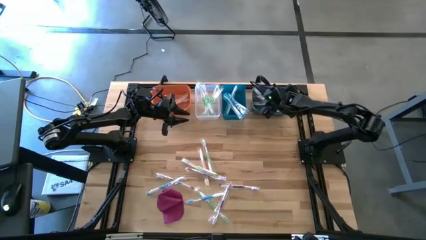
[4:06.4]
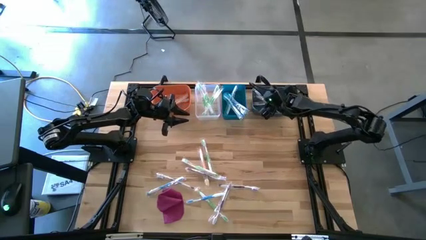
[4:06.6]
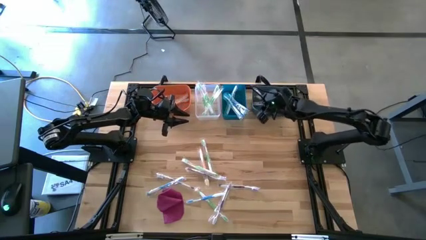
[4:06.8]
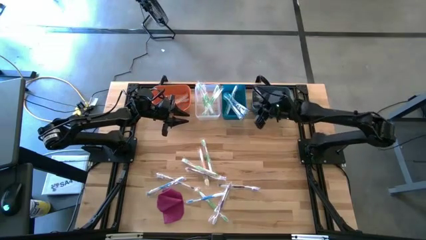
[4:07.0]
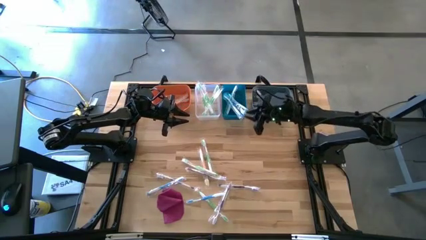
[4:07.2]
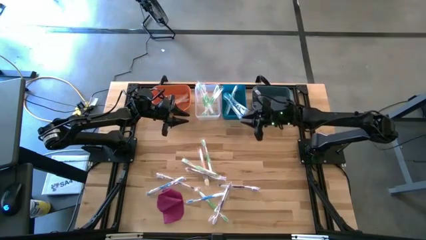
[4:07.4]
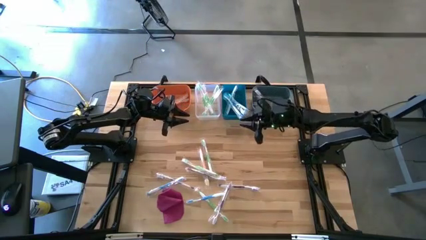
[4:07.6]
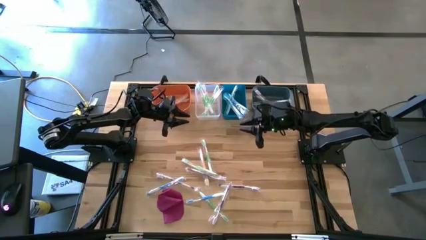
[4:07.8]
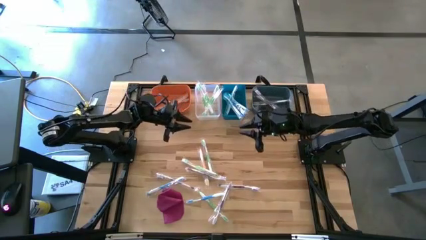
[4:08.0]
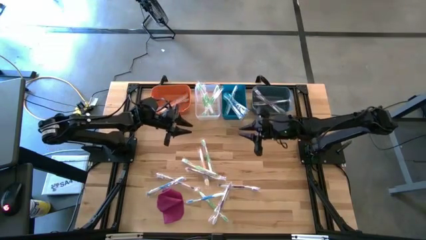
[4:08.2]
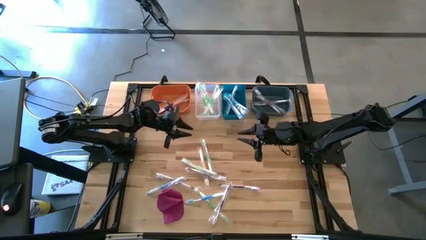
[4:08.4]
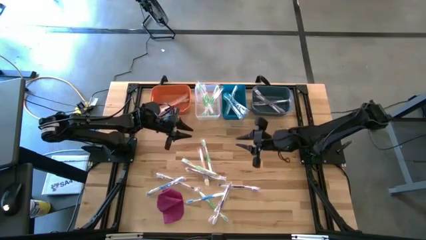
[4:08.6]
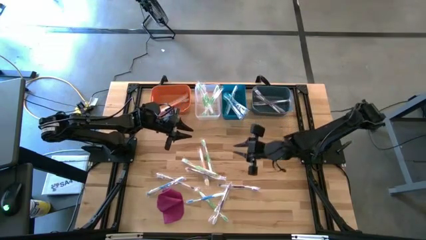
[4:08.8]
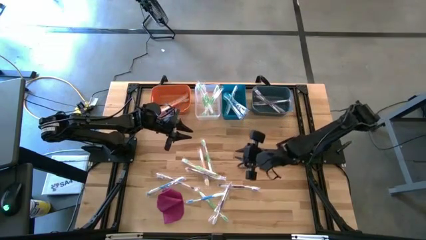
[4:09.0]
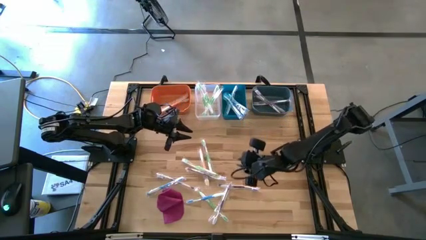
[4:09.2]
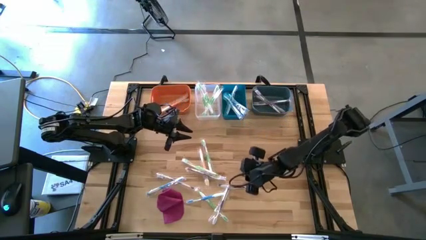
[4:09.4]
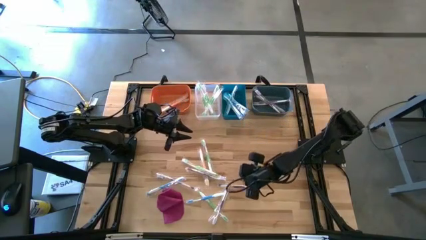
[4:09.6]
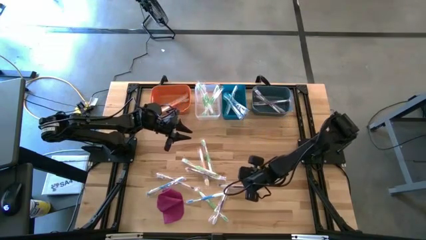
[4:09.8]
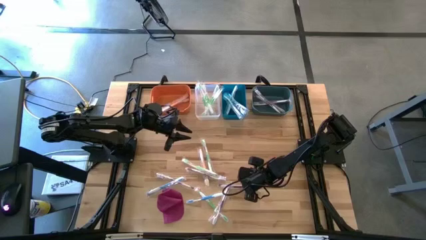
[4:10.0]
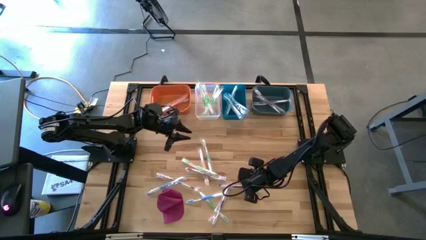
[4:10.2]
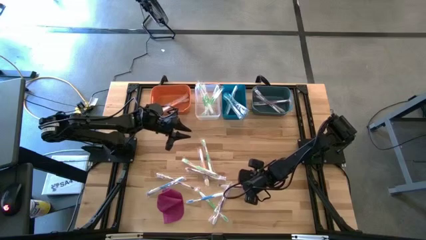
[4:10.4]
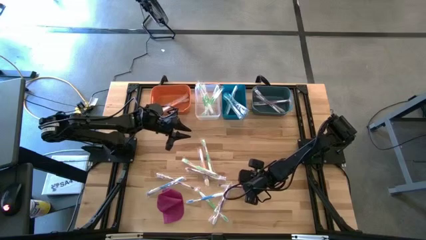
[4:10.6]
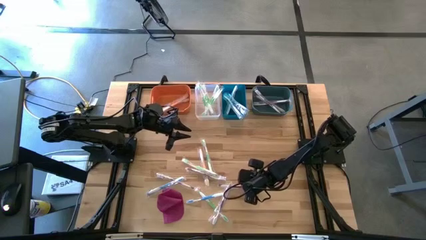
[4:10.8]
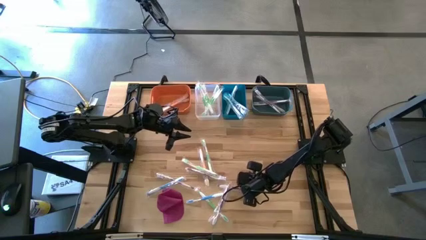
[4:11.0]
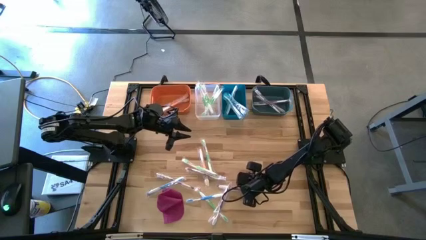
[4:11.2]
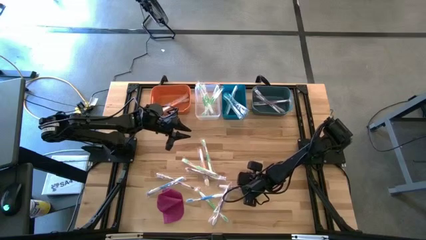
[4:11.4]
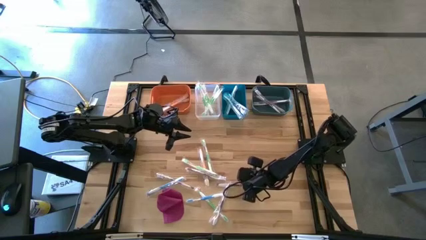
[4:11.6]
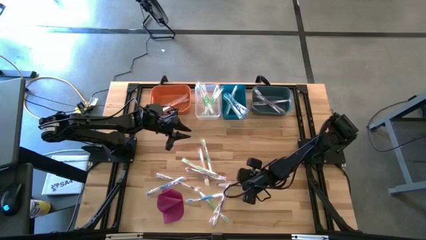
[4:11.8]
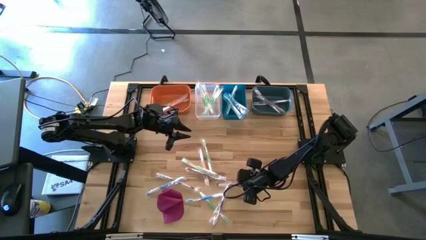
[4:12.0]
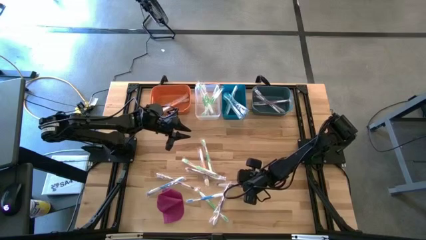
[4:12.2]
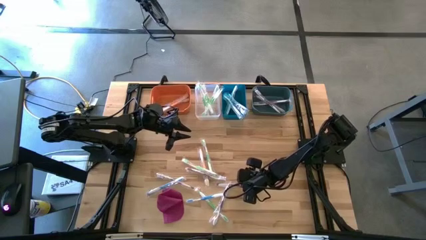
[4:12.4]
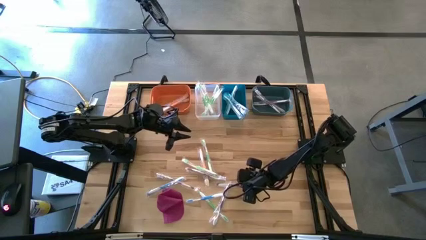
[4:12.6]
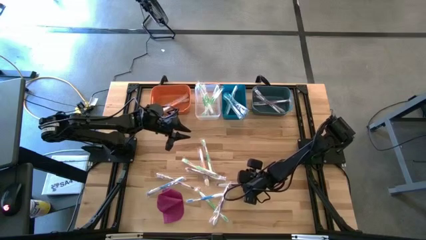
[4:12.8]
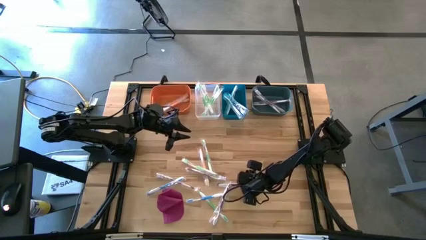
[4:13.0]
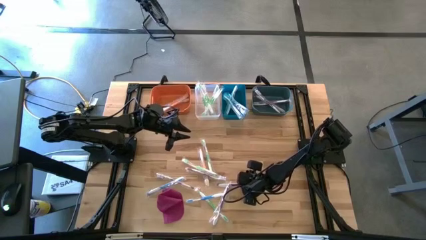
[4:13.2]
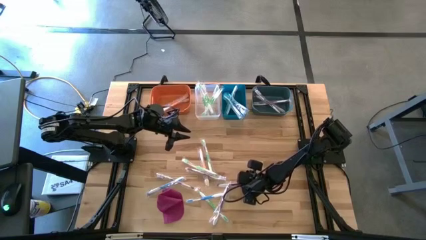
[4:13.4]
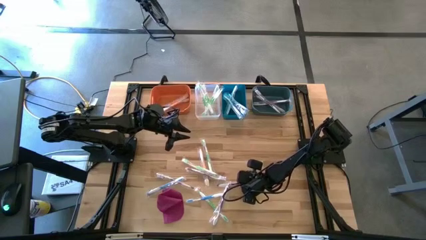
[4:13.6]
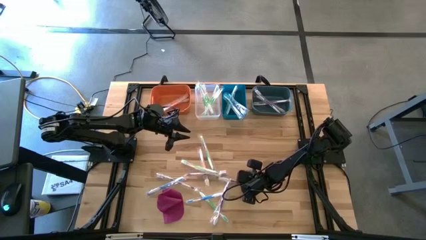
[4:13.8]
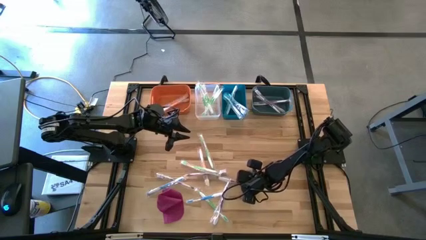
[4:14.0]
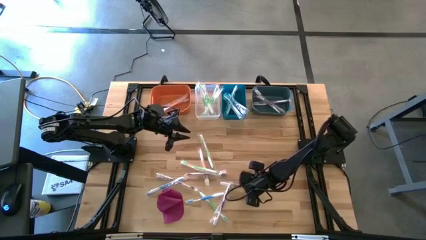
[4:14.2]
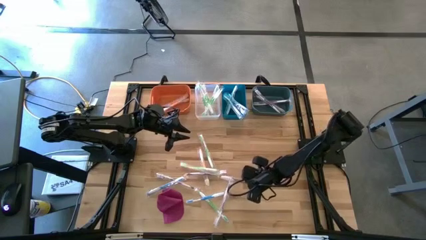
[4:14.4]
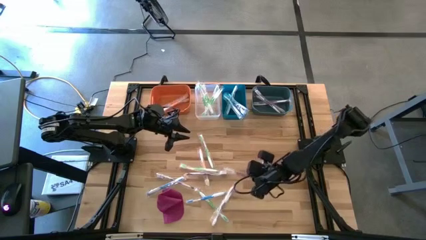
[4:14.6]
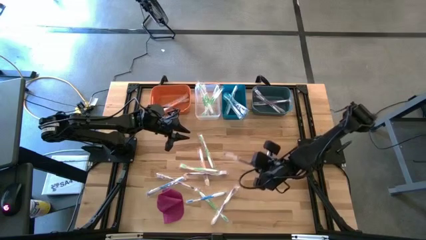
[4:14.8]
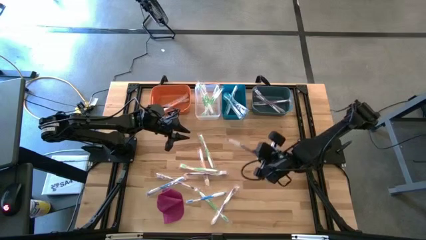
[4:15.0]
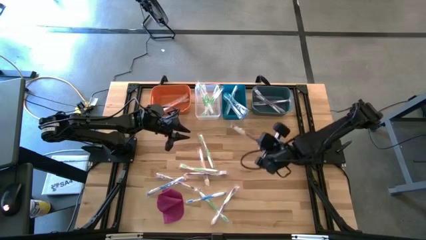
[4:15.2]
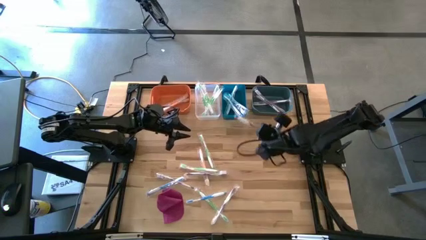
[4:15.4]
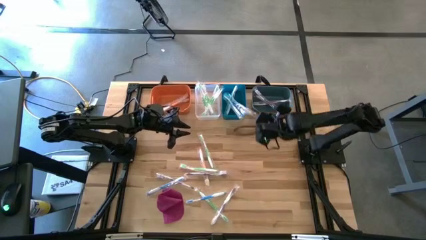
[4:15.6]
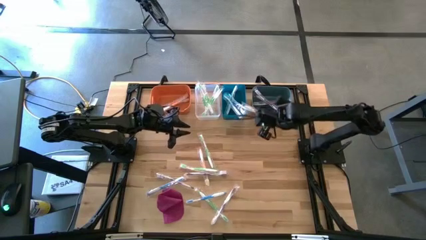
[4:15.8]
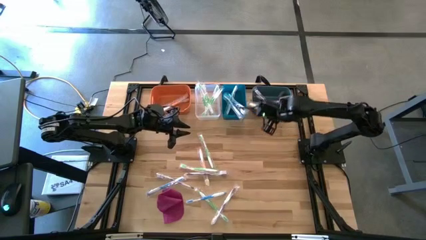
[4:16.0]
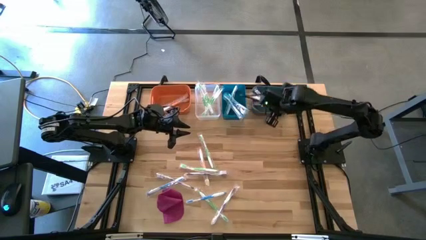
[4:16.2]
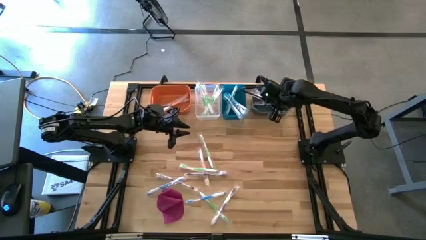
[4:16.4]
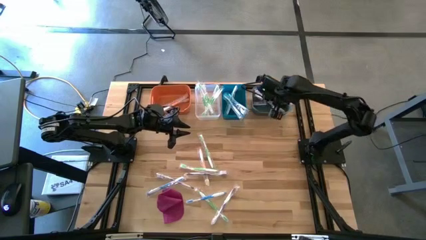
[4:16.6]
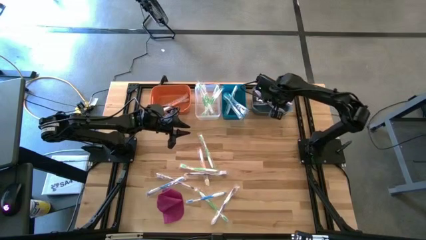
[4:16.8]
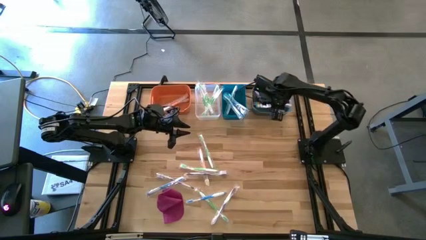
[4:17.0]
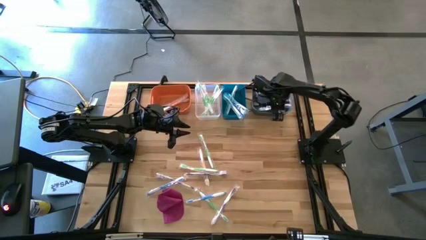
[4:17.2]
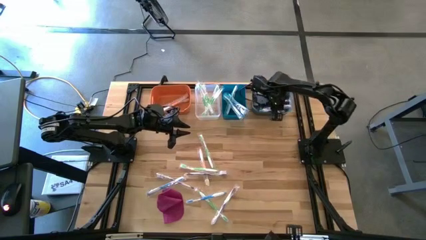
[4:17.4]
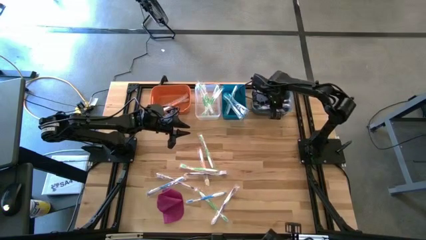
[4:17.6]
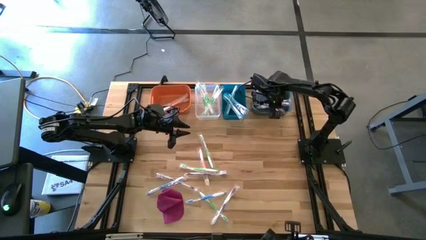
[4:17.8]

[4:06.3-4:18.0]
Task: Pick & Place Toothbrushes
Put the purple toothbrush into the green bin

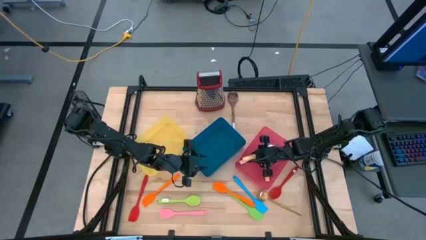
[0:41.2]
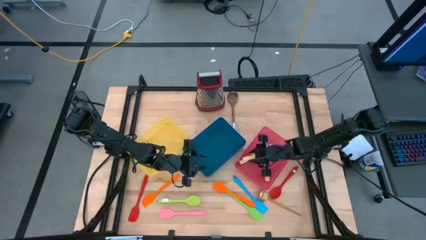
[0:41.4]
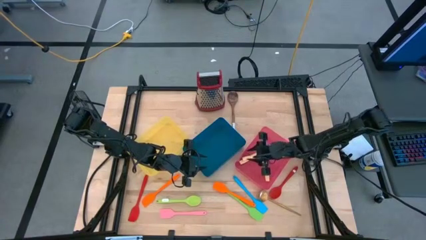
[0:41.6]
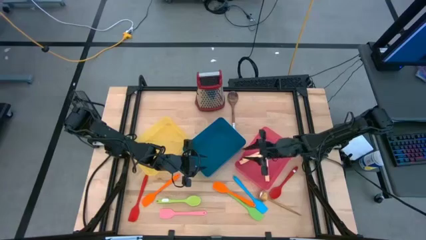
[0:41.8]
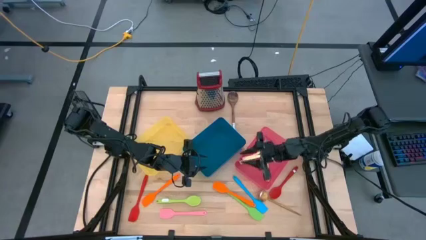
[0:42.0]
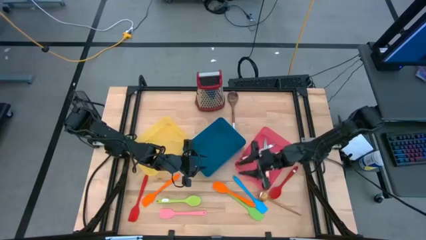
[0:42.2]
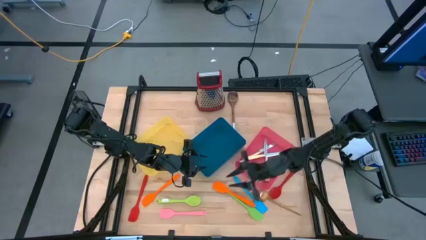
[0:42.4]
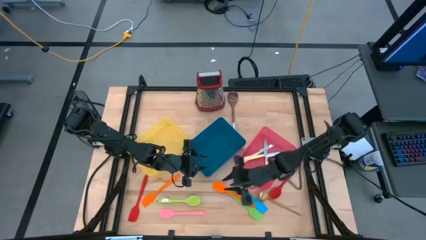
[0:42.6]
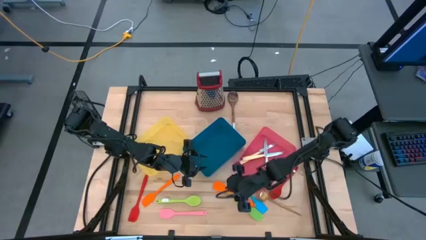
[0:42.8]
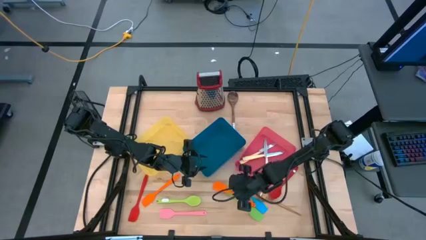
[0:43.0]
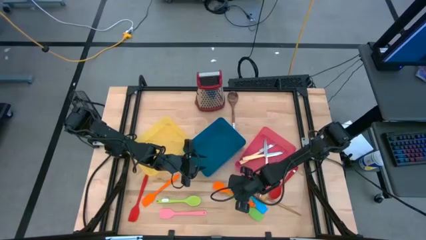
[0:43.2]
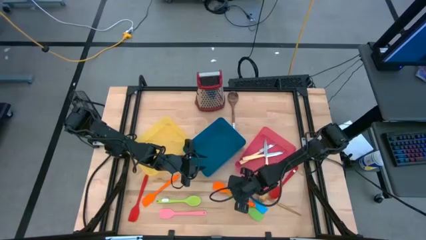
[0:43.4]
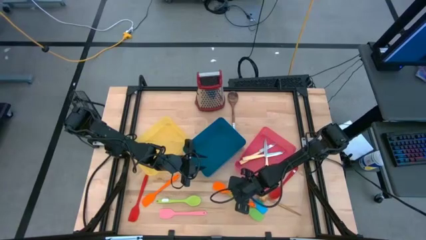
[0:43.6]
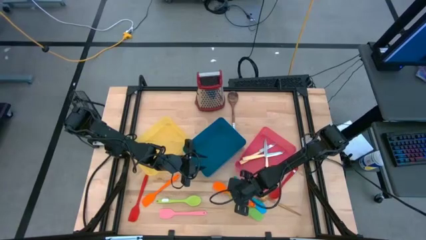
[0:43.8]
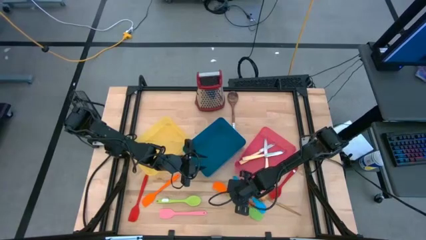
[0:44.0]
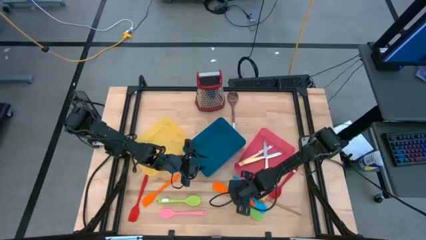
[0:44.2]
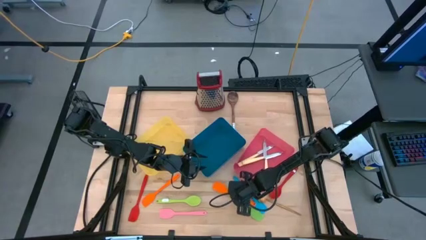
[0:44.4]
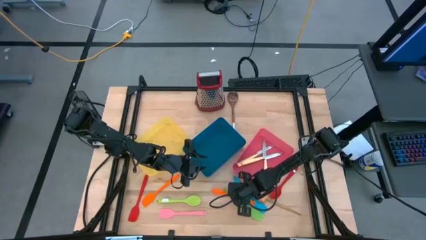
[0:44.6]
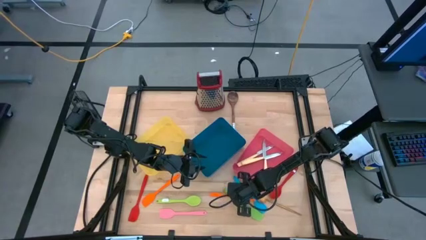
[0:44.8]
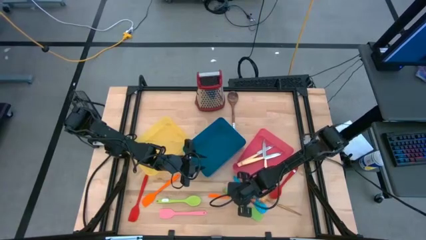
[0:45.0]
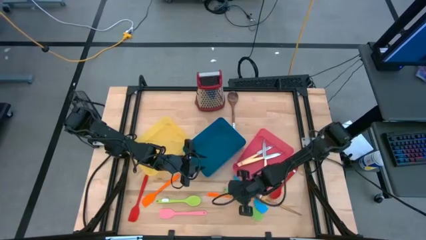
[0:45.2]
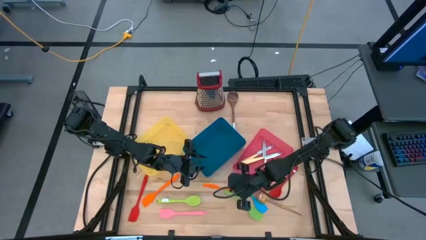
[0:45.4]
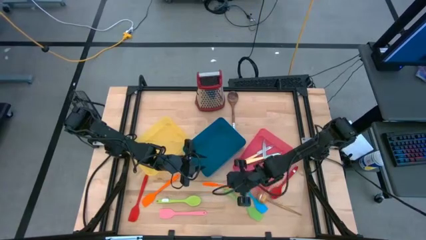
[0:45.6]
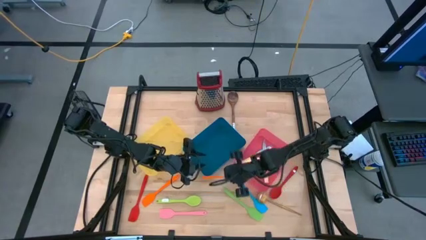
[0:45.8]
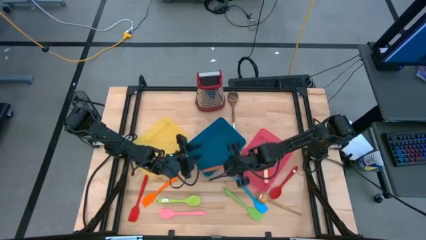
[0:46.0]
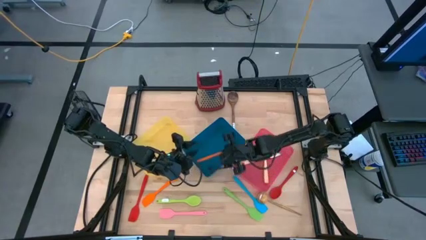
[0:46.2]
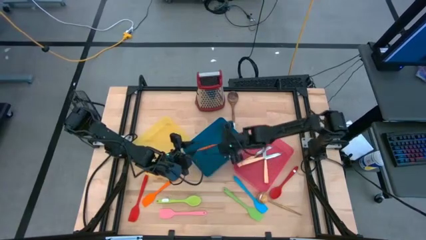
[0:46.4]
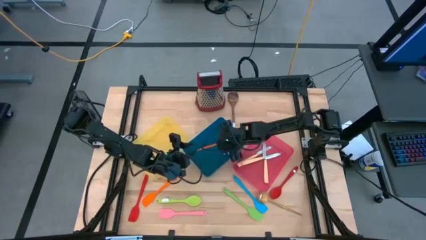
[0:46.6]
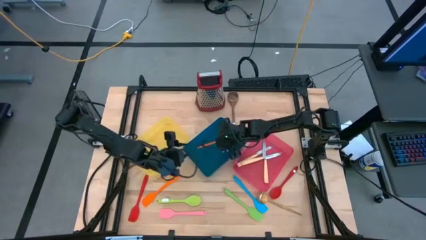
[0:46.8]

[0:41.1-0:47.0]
Task: Pick & Place Kitchen Items
Put the orange spatula into the blue bin
